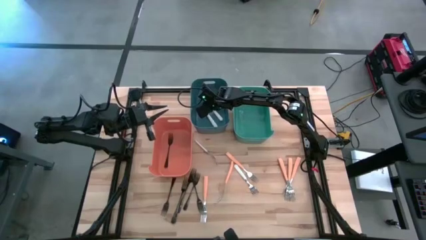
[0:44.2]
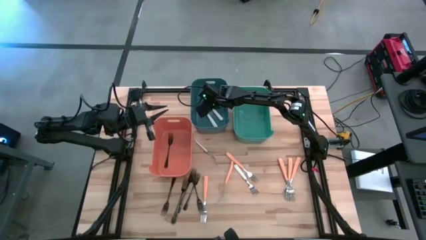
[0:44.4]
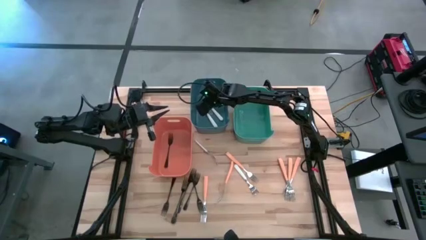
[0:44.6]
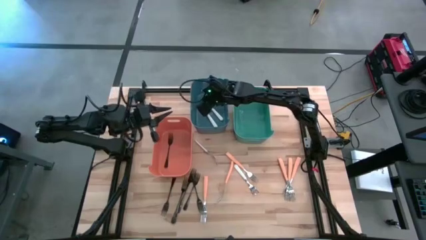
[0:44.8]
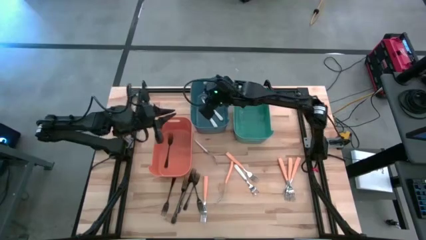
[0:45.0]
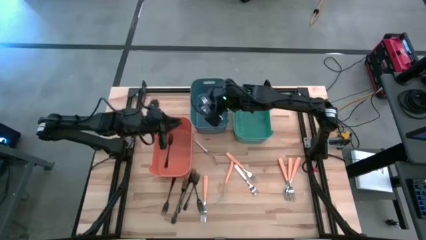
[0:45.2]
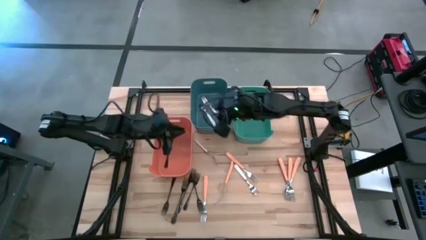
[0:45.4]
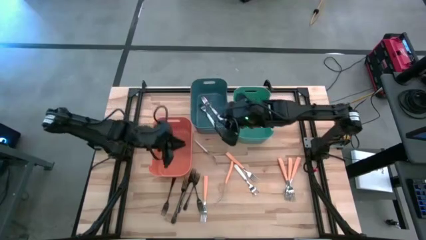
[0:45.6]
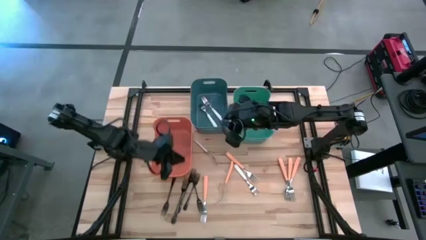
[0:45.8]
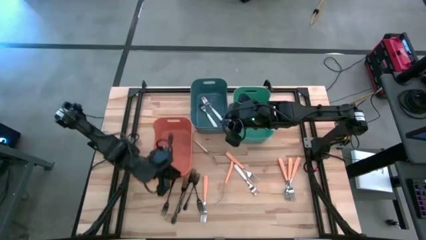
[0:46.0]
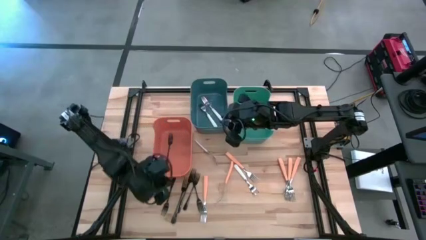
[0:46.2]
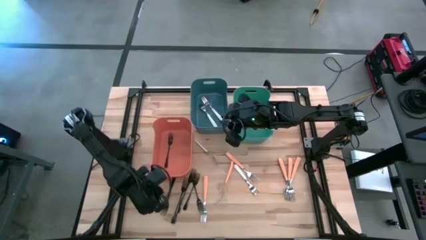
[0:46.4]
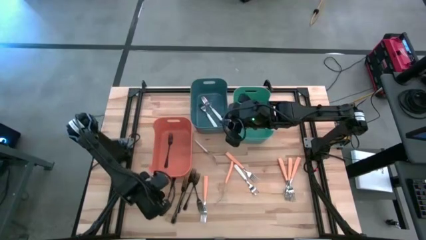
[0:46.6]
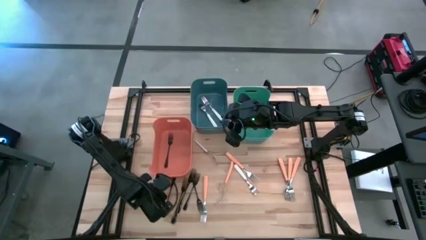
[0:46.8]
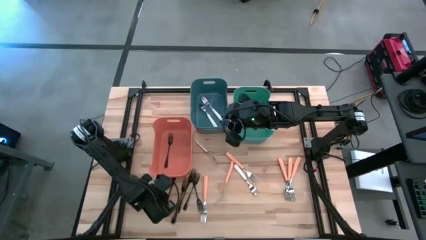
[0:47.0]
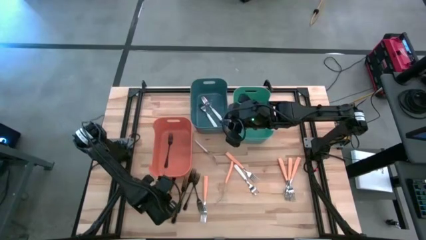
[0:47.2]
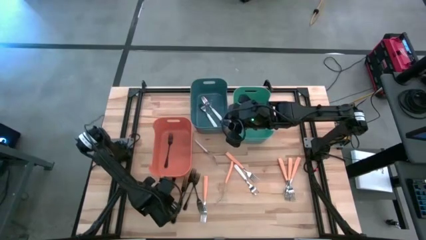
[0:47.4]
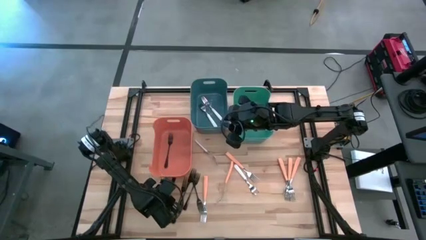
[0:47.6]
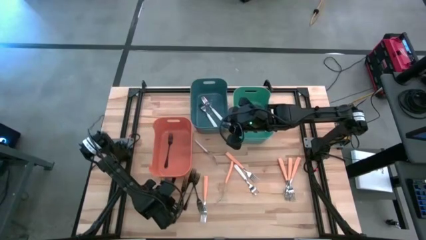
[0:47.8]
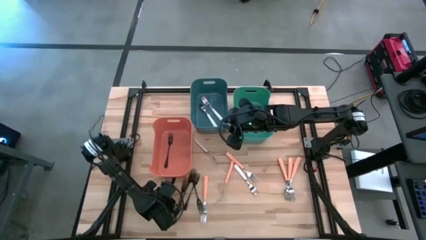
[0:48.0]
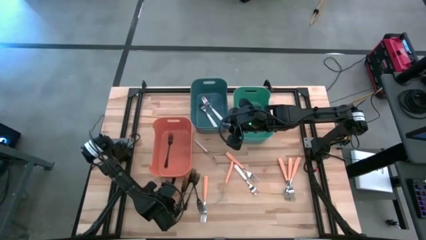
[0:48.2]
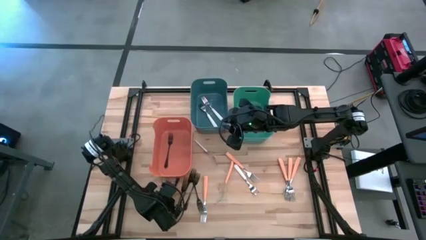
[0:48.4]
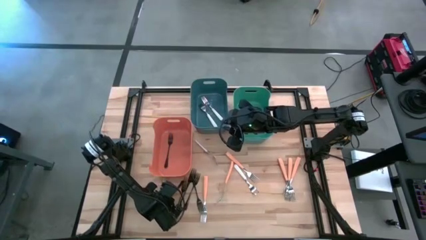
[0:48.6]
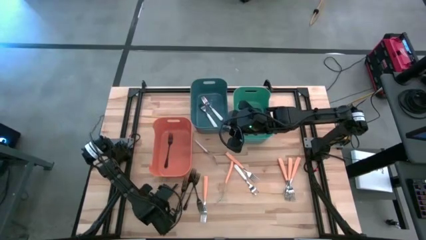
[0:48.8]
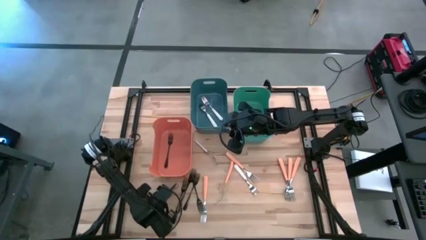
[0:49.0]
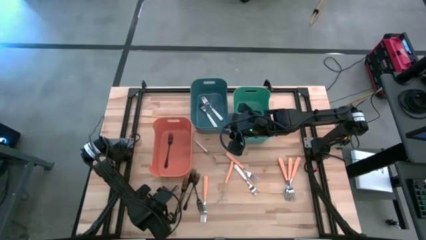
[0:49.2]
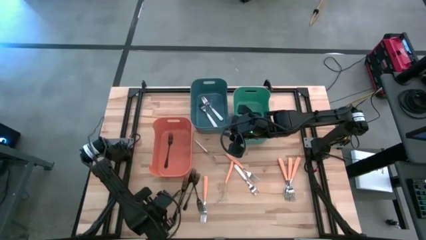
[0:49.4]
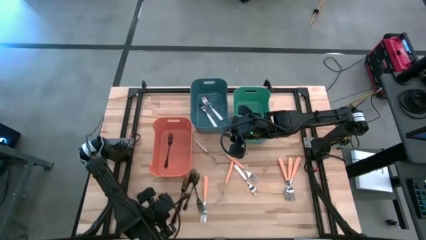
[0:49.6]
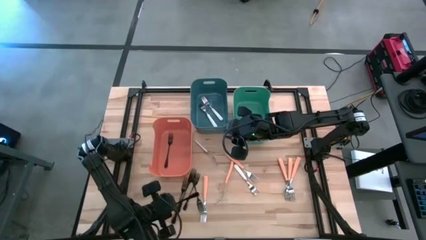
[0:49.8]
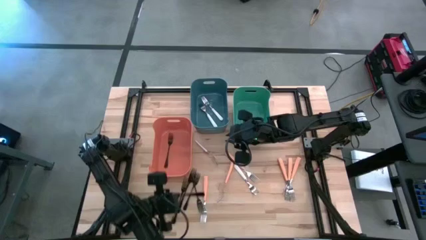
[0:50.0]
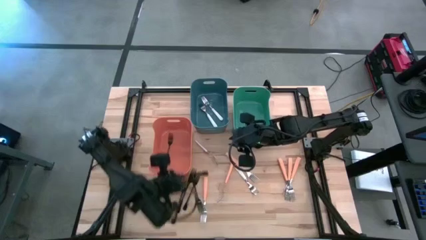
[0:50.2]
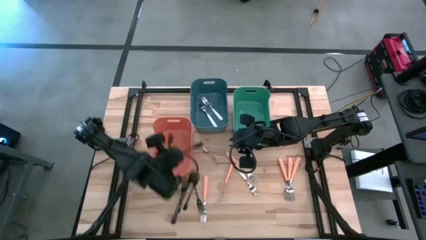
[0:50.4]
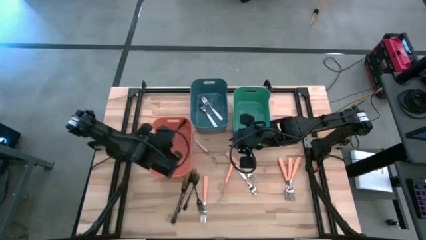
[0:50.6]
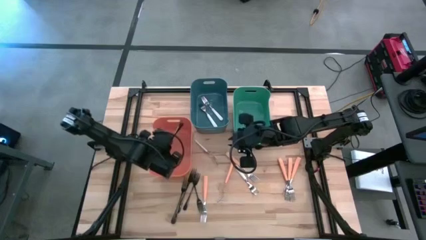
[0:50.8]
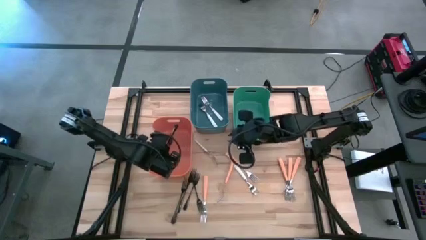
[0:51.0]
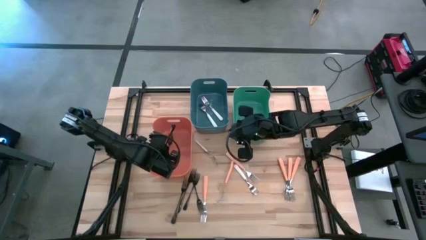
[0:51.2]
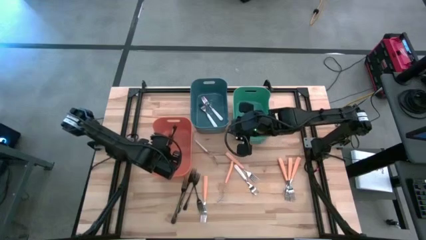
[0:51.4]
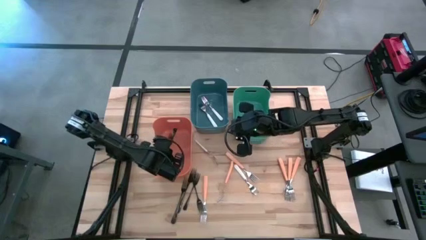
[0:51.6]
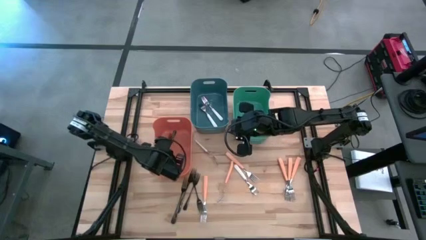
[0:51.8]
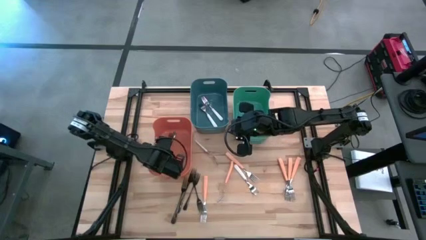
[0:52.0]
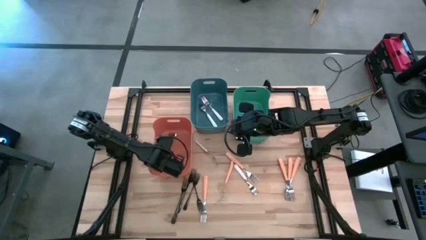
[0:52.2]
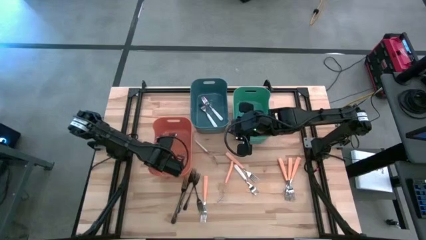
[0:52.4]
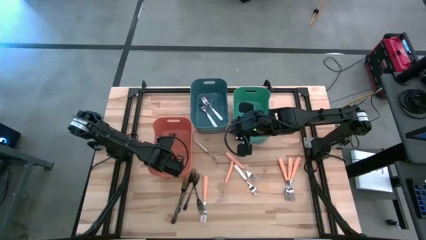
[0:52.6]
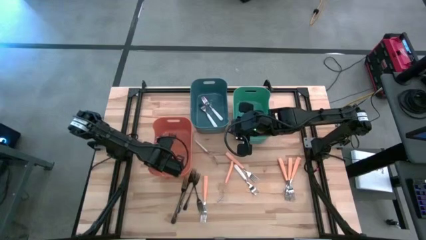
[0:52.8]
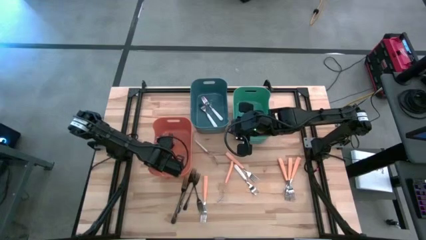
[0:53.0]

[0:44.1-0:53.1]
Task: Sort silverware by color (type)
Put the black fork into the orange bin
